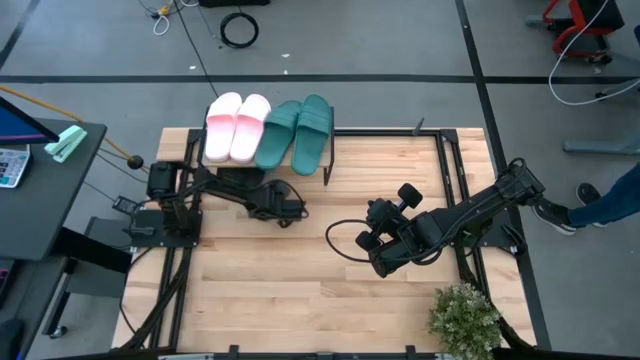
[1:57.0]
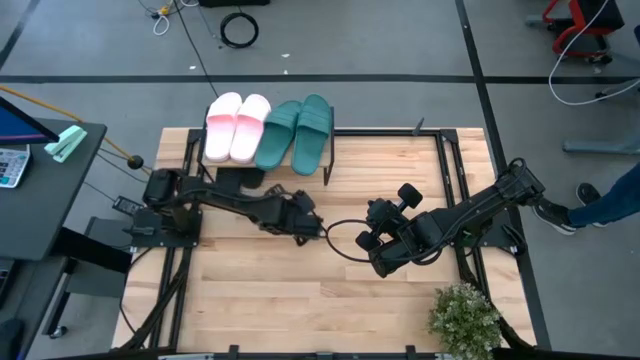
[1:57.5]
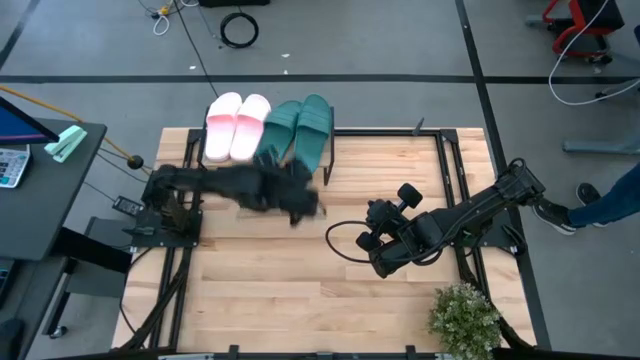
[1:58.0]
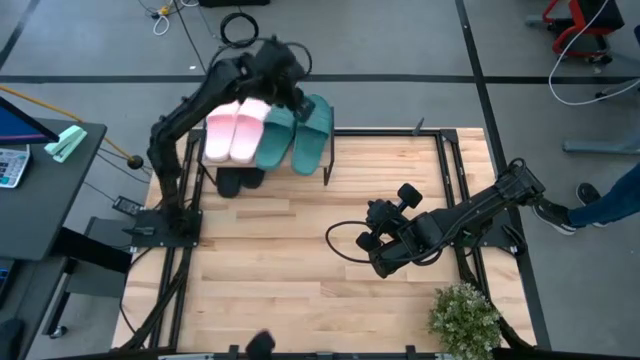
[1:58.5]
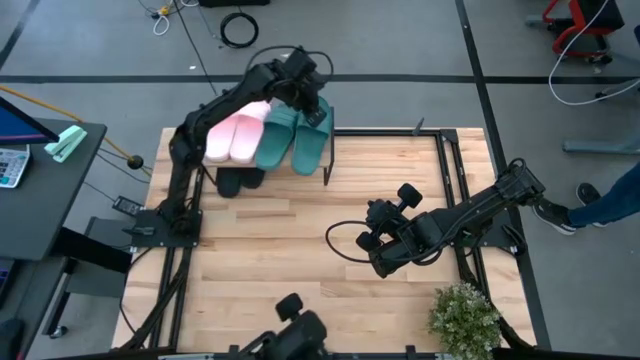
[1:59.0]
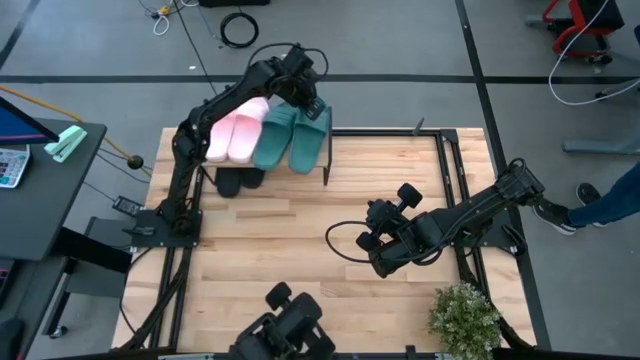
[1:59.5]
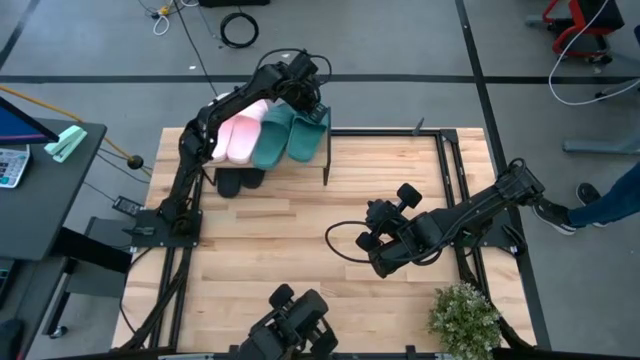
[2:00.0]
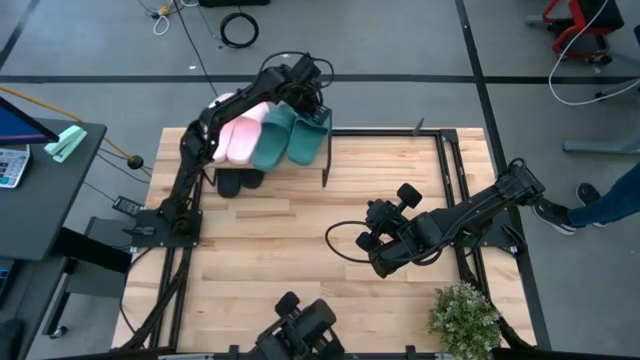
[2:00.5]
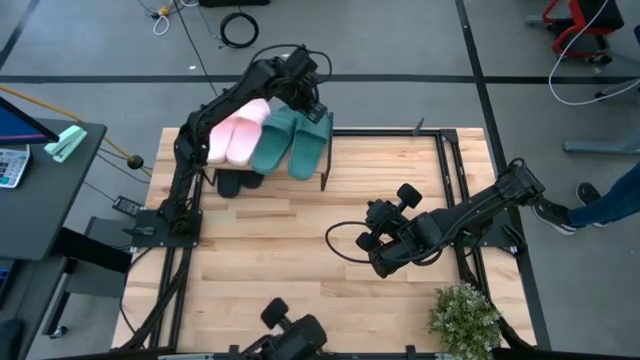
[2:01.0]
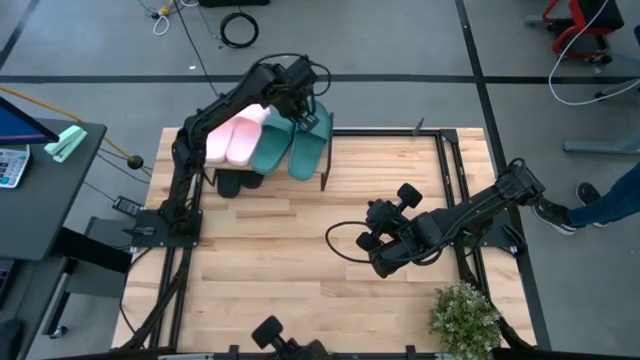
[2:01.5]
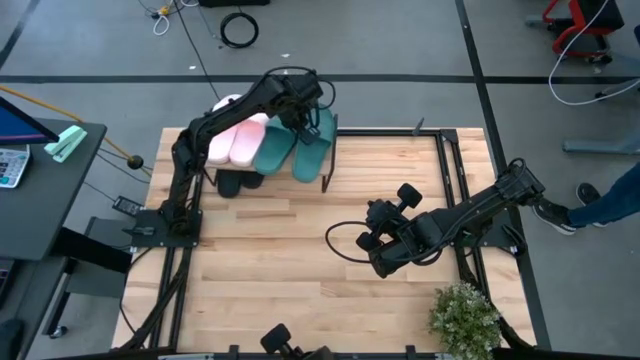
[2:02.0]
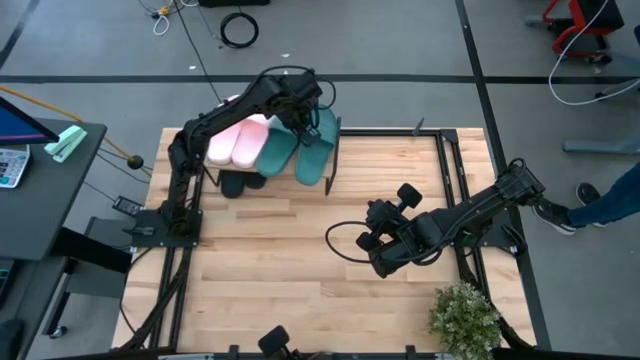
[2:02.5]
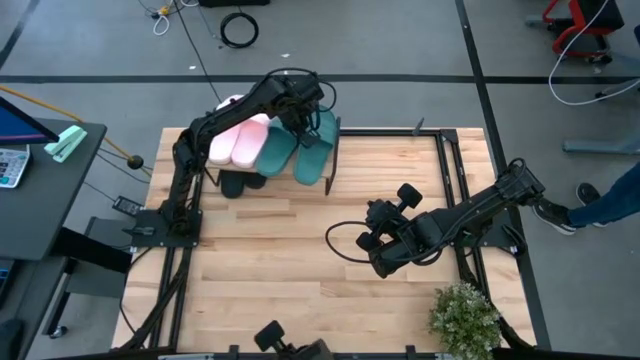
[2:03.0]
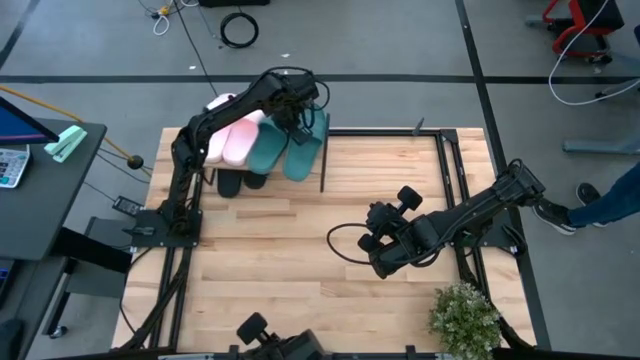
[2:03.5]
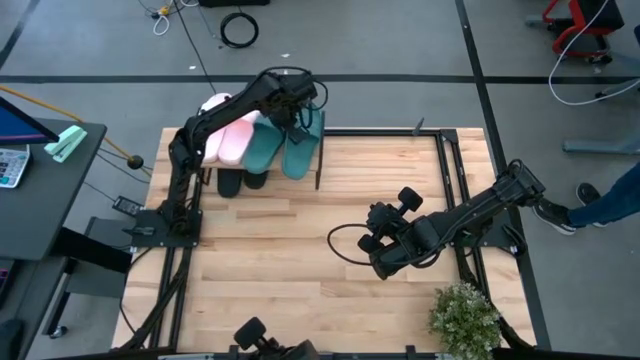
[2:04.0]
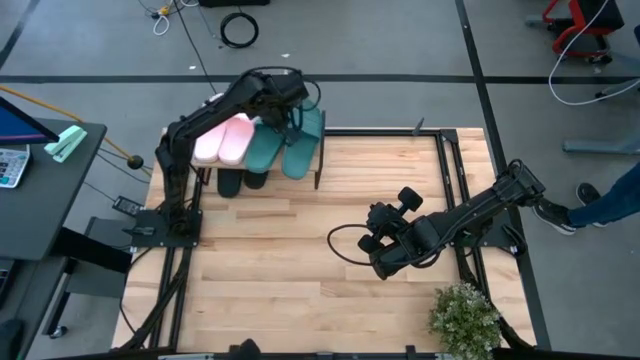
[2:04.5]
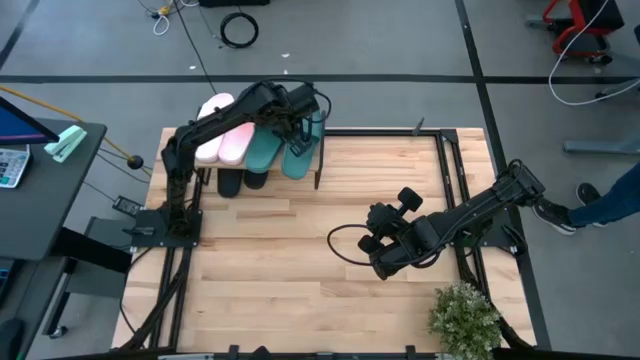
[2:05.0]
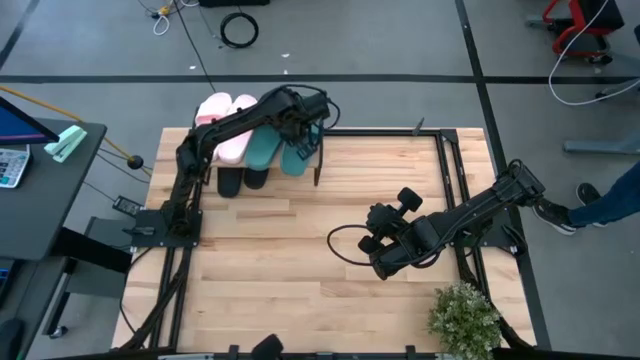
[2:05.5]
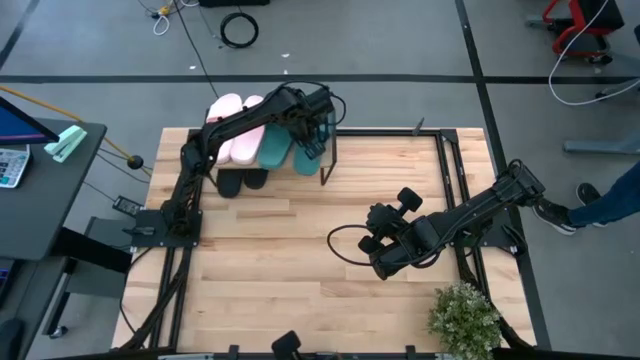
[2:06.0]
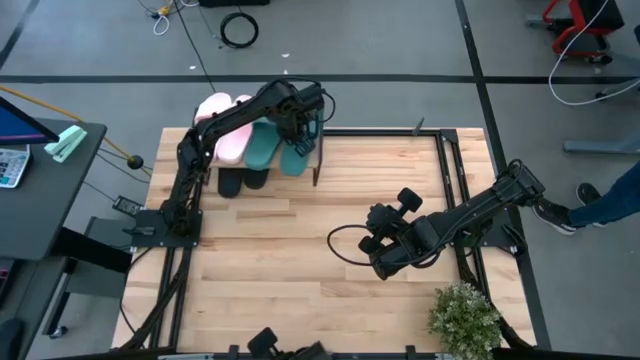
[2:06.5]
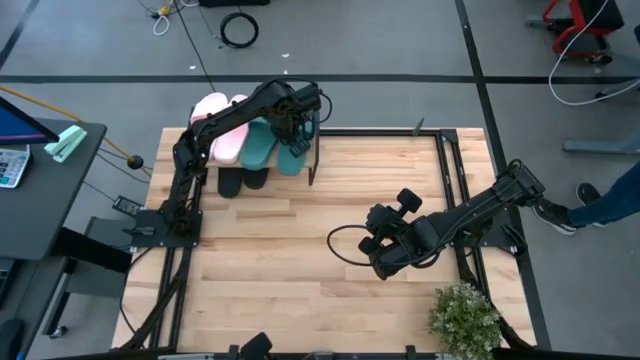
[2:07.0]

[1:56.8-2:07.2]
Task: Pick and place slides into the shelf
Adjust the green slides on the shelf

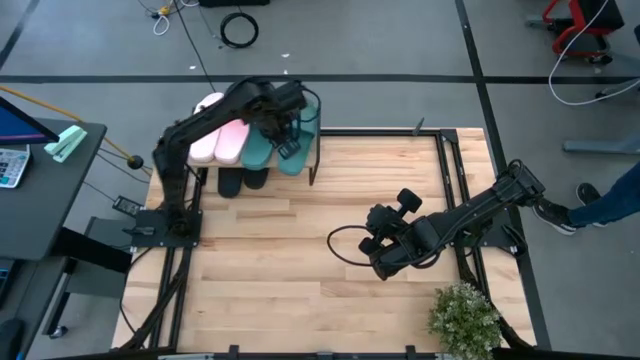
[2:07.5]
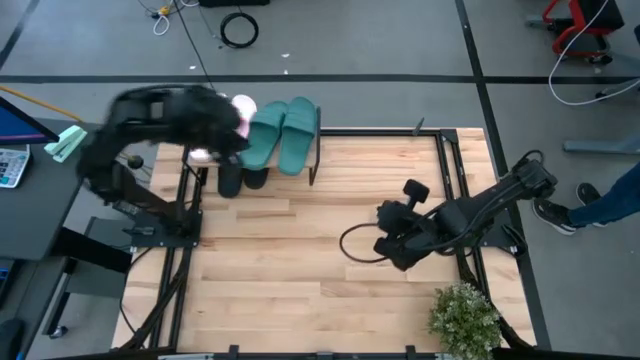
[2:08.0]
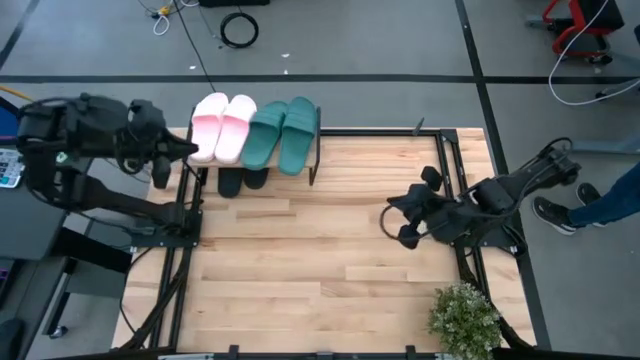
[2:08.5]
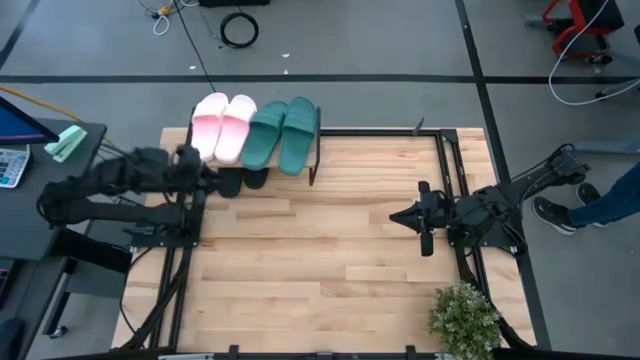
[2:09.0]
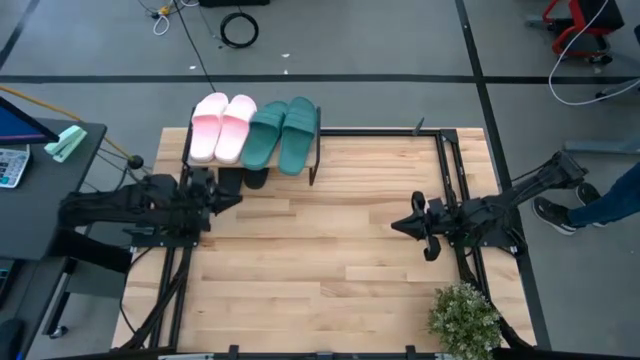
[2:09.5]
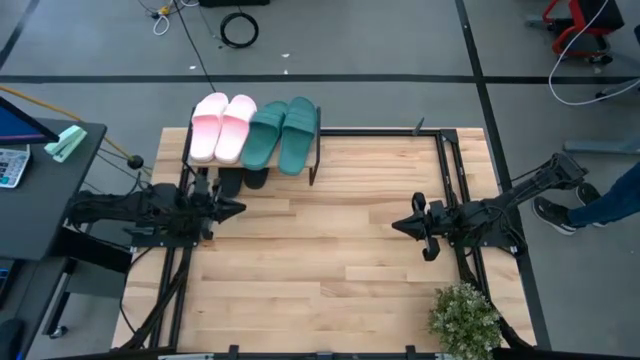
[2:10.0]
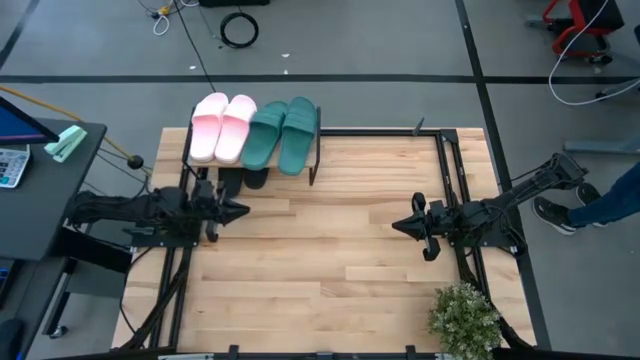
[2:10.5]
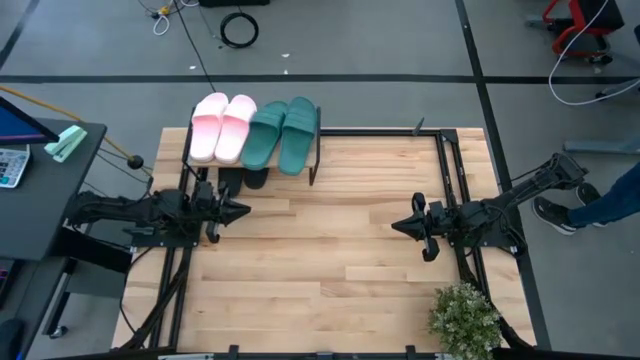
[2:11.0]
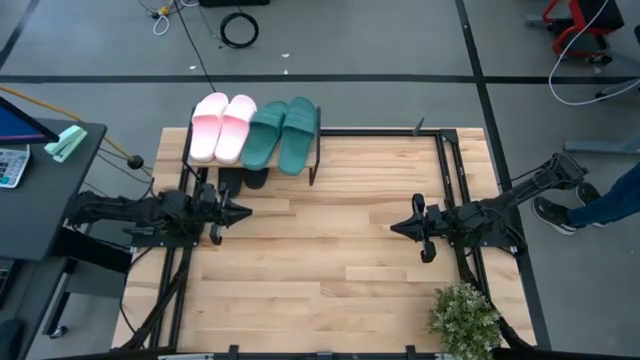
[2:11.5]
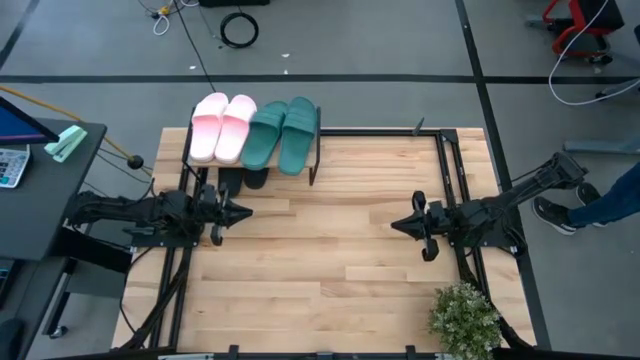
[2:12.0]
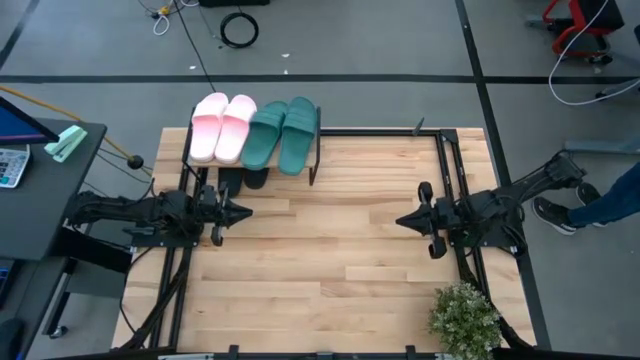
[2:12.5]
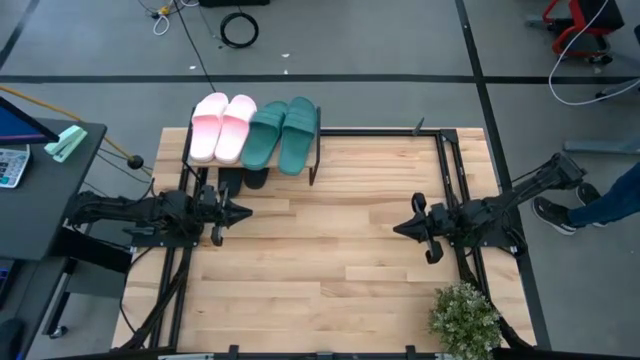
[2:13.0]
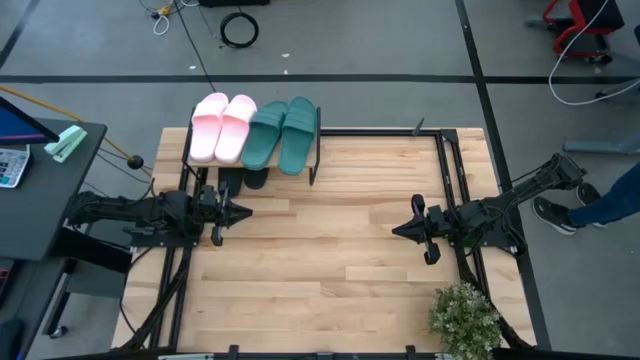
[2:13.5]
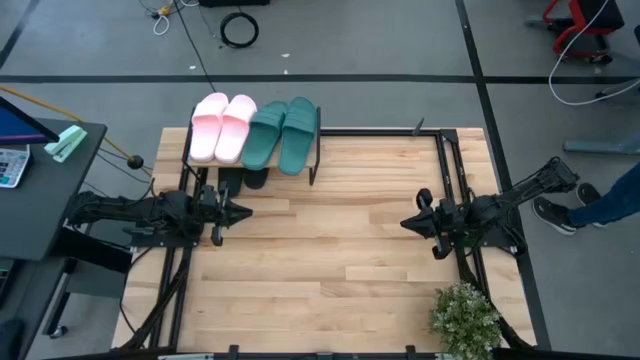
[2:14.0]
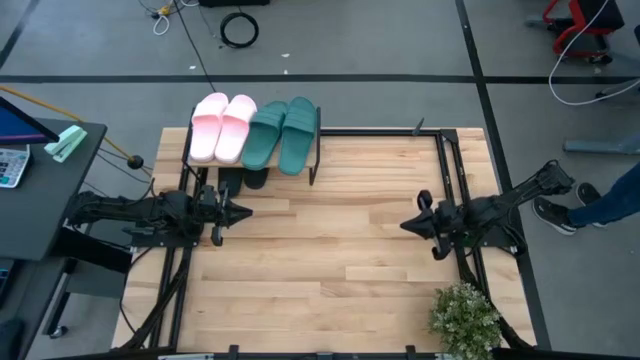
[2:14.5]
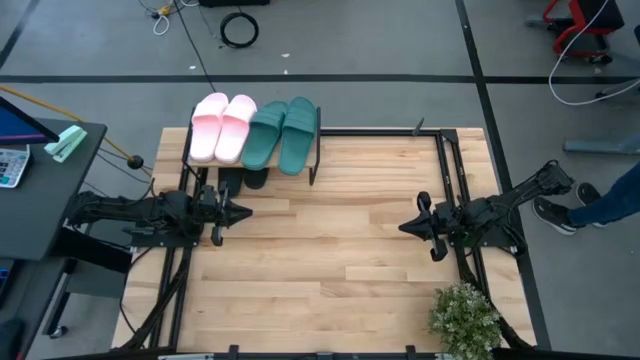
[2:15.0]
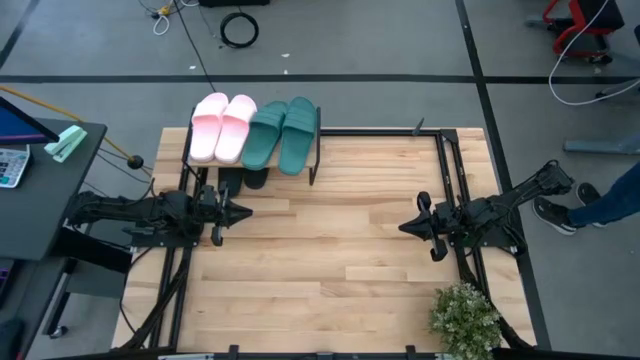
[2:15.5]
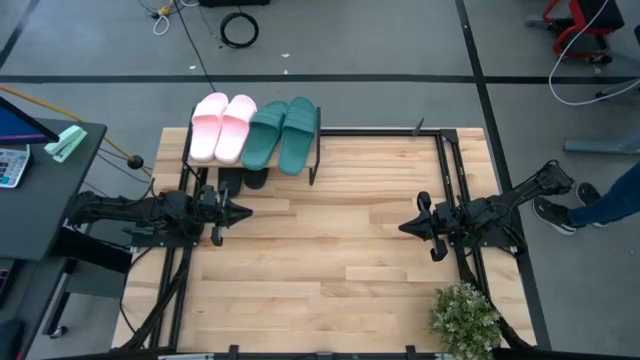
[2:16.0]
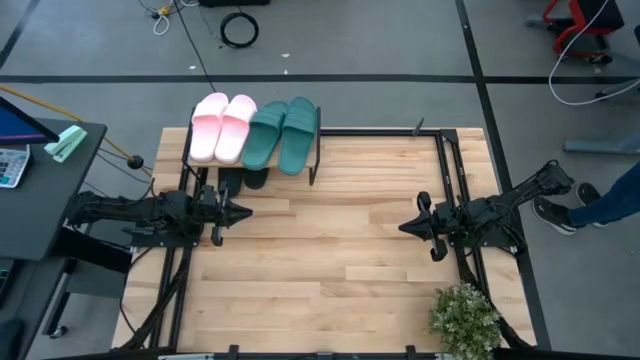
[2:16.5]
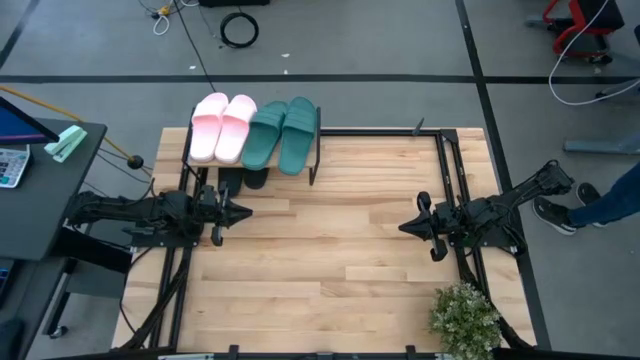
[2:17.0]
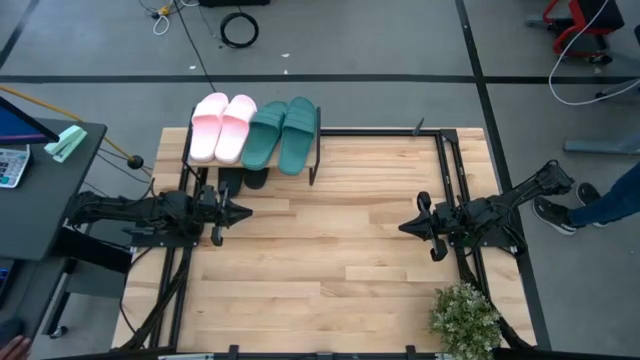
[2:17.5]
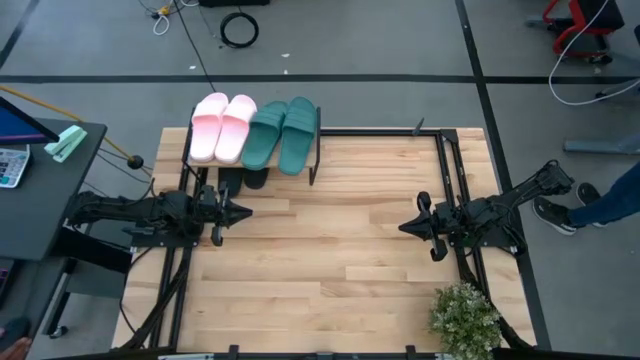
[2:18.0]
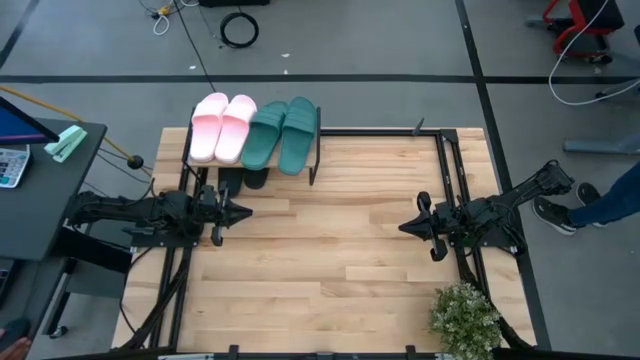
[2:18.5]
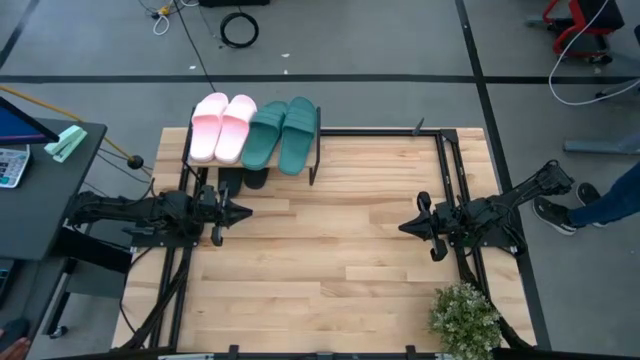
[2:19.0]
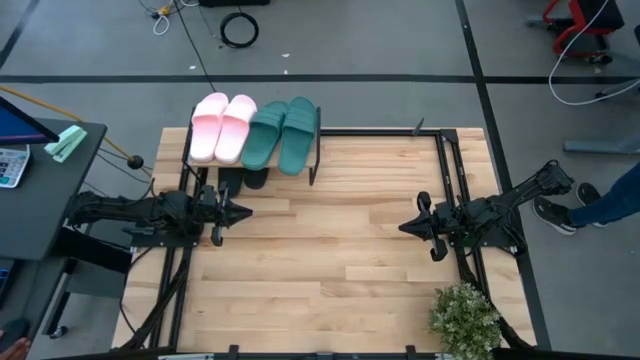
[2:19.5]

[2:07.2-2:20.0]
Return to Home Position

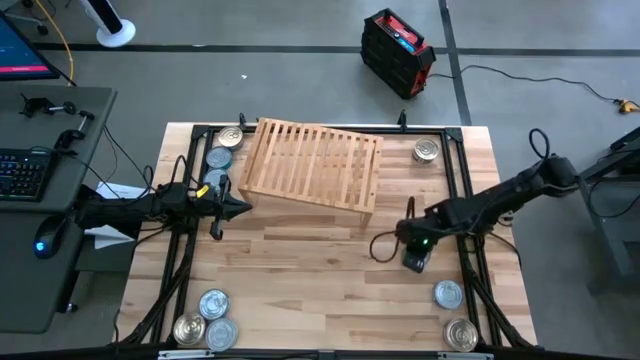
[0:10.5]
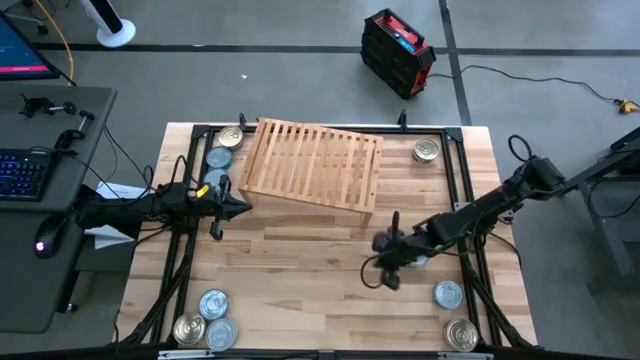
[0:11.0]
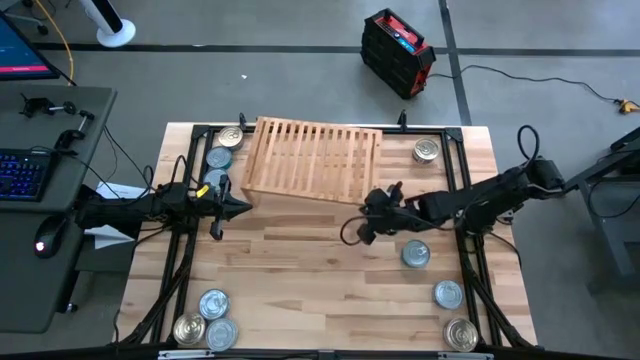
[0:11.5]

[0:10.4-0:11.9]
Task: Stack canned seafood by type on shelf
Adjust the shelf
